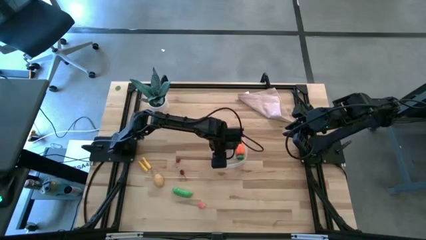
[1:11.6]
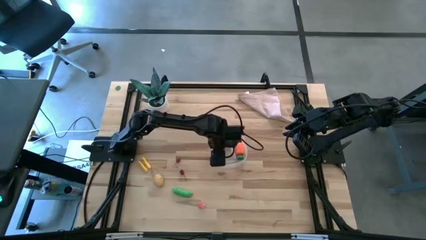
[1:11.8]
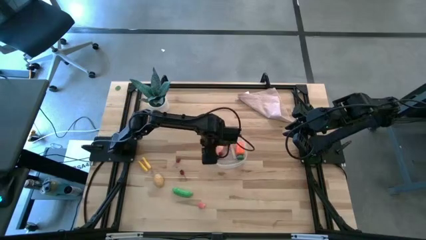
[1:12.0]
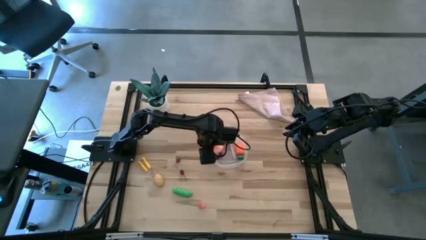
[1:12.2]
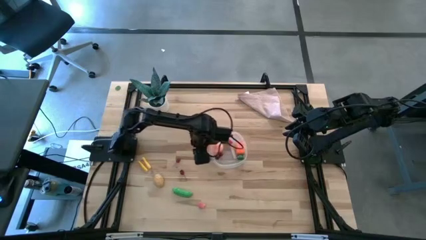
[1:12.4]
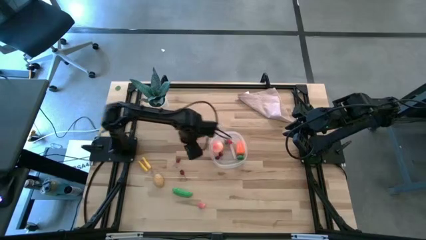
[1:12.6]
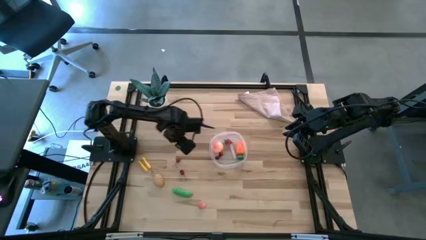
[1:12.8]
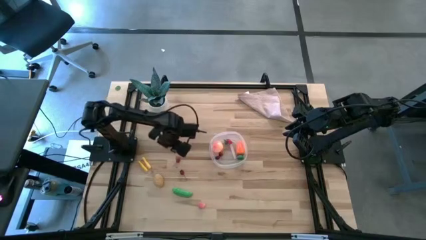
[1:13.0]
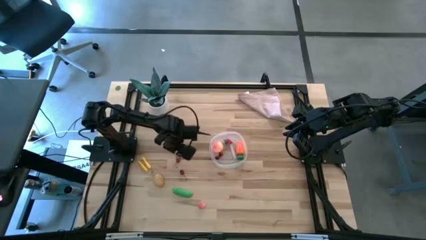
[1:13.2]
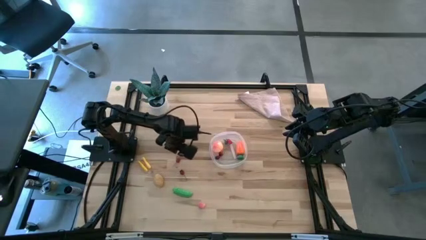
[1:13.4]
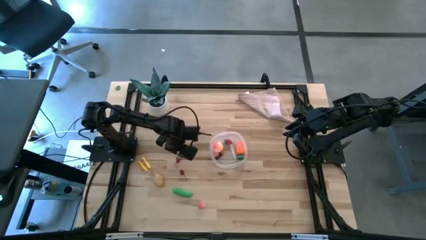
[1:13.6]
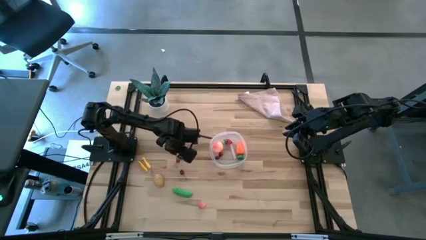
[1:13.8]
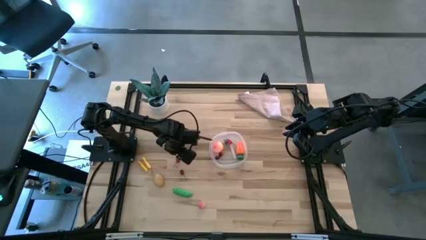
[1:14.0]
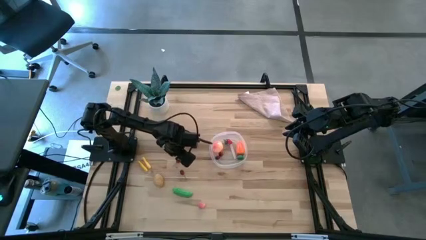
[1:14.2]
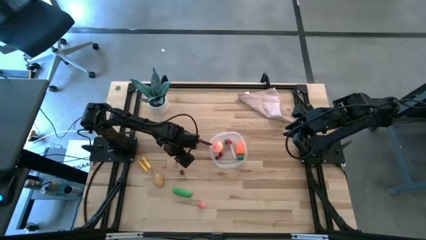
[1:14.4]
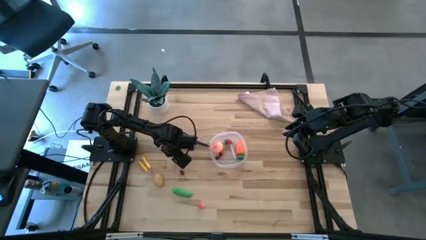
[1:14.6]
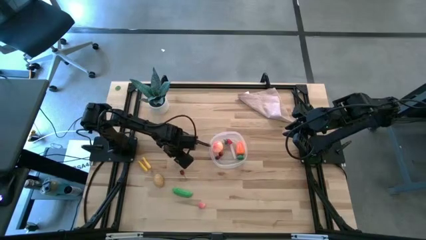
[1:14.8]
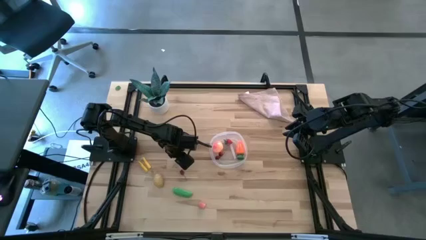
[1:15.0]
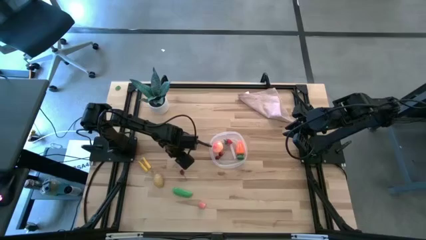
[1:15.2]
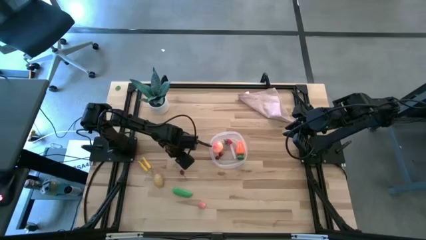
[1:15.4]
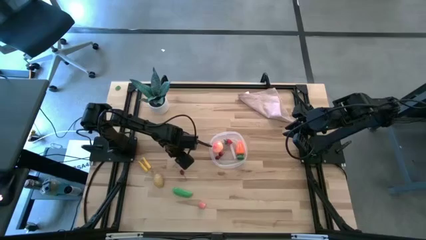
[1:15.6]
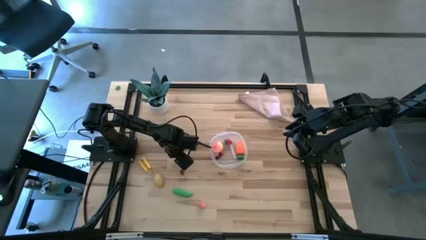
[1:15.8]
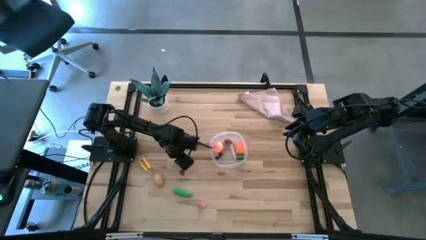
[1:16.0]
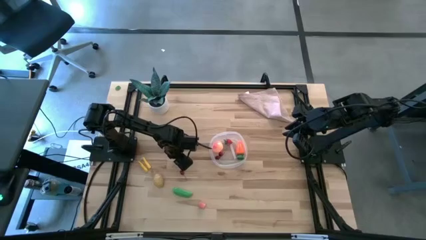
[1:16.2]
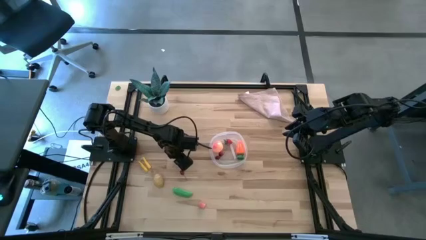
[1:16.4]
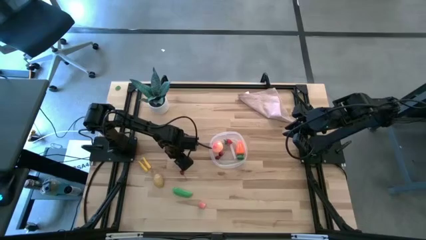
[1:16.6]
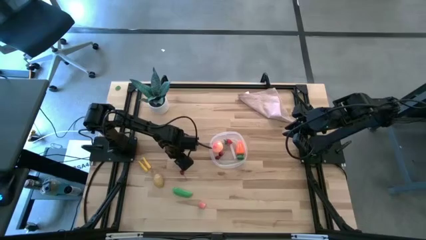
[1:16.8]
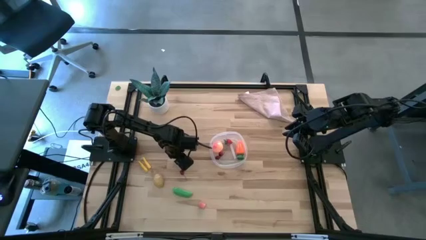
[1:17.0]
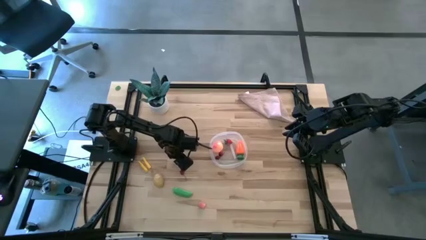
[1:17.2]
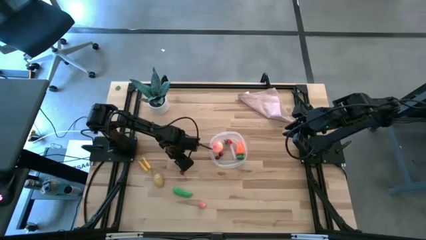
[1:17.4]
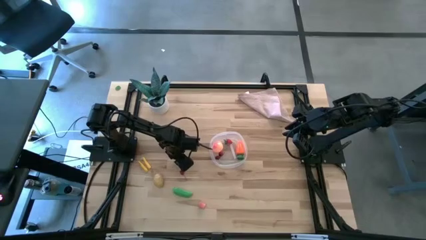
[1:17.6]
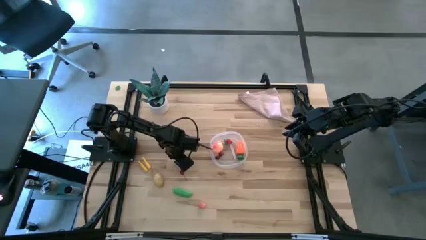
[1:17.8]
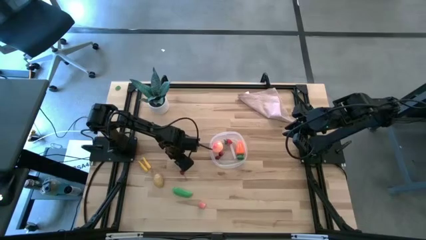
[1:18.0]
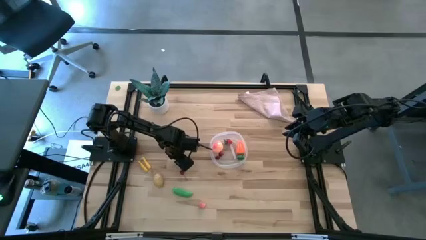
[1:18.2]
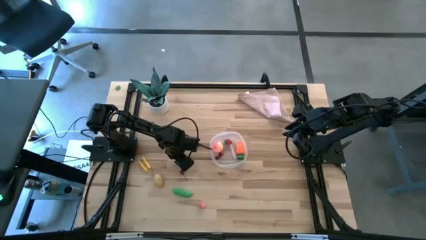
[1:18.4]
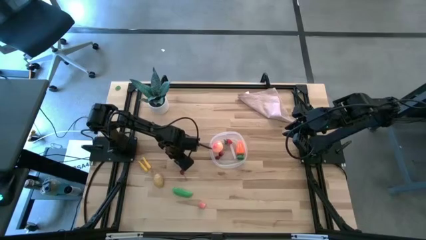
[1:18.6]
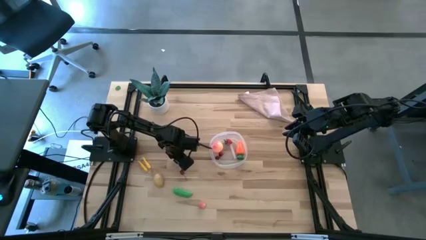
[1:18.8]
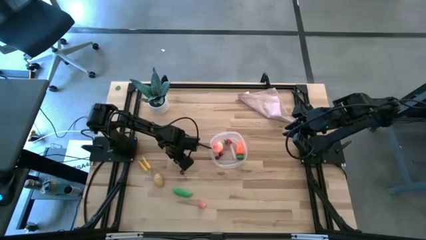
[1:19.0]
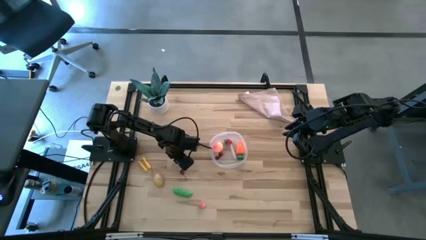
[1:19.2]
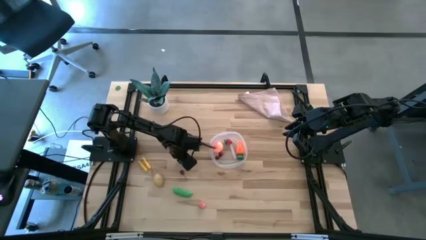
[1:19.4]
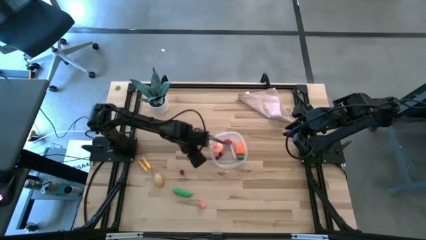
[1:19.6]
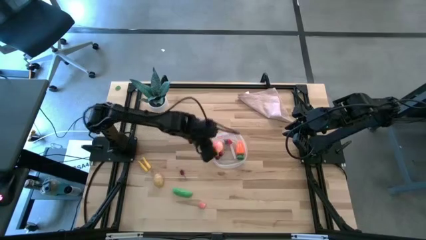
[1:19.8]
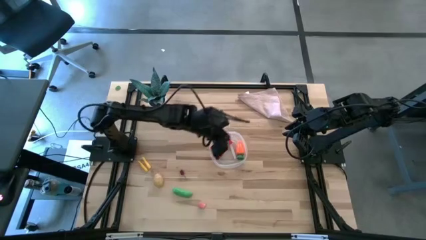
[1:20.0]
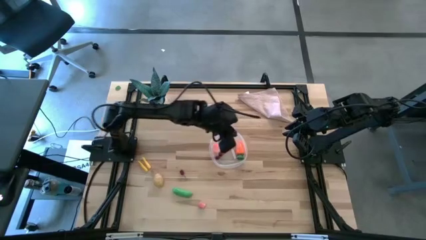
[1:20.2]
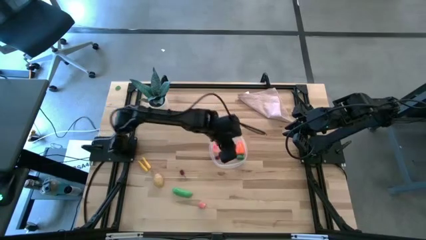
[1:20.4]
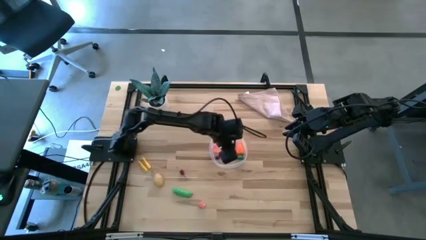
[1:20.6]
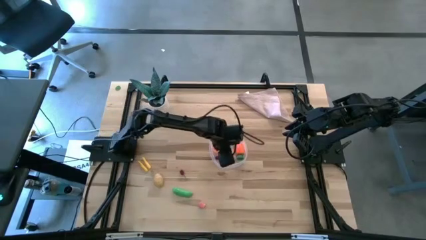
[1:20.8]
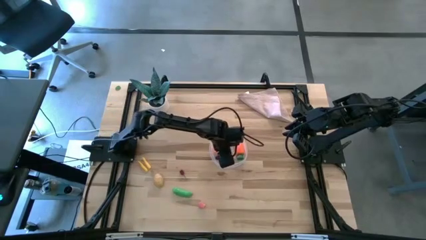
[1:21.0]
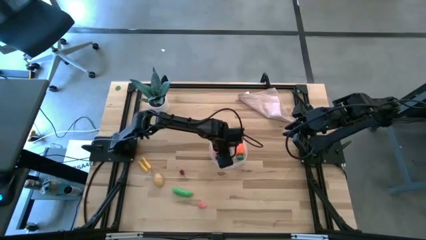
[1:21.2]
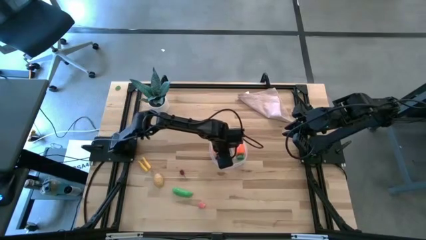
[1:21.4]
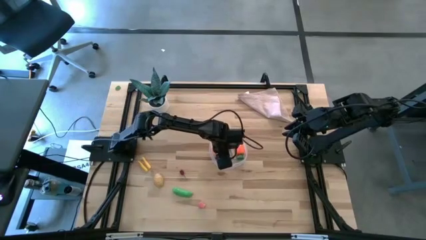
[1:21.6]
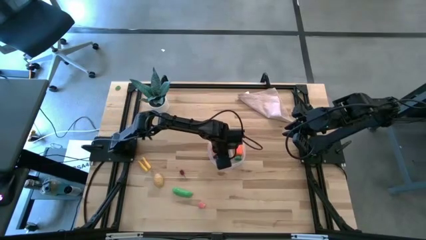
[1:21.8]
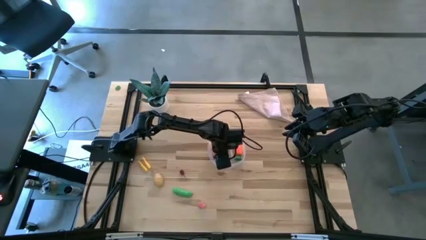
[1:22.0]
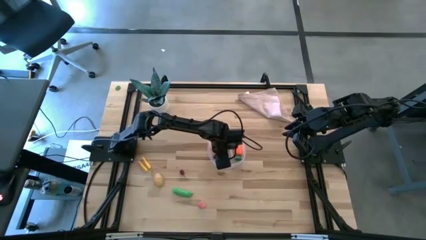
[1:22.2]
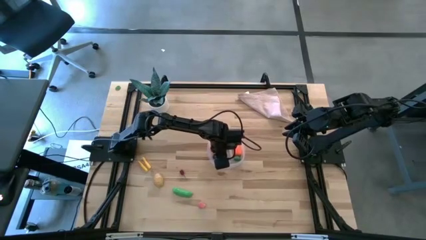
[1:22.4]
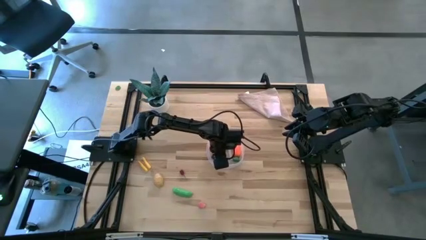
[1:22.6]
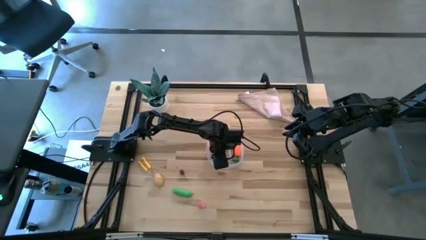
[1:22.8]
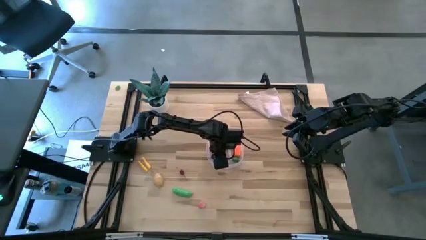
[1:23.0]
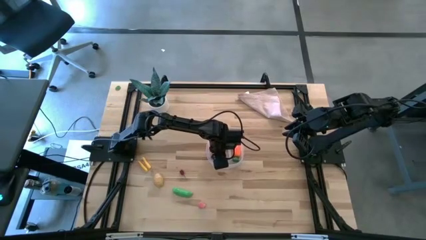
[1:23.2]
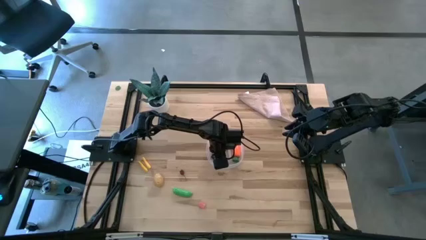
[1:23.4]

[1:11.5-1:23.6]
Task: Pick and placing Produce into tupperware
Put the red cherry into the transparent bin

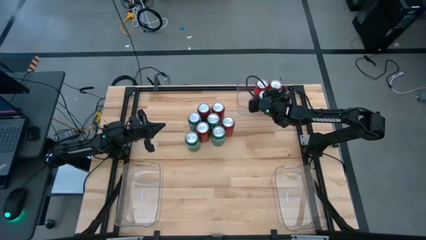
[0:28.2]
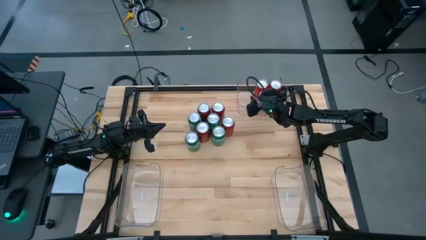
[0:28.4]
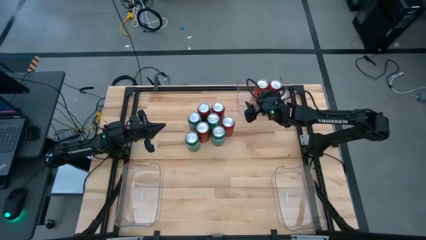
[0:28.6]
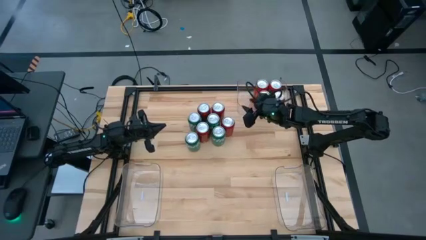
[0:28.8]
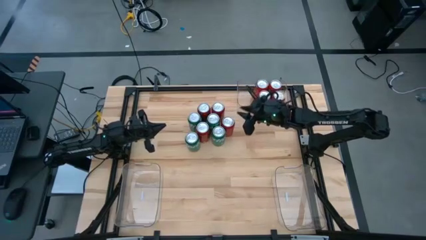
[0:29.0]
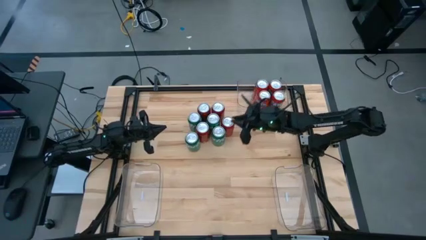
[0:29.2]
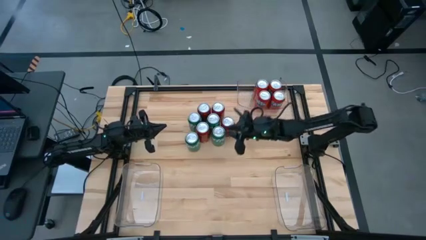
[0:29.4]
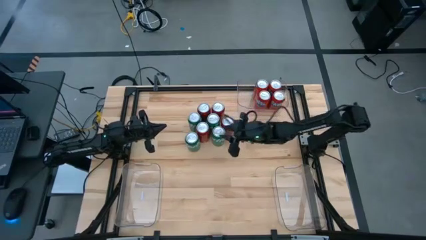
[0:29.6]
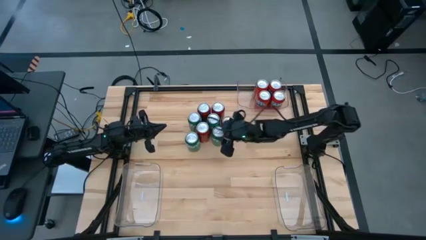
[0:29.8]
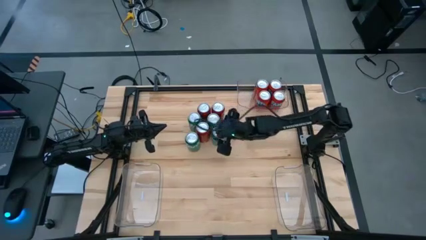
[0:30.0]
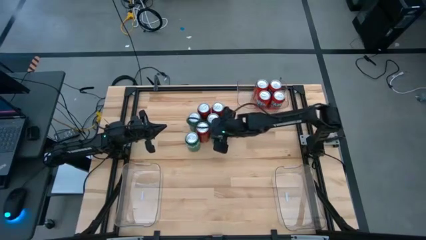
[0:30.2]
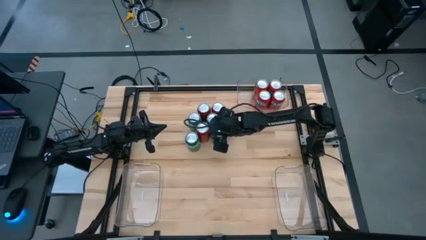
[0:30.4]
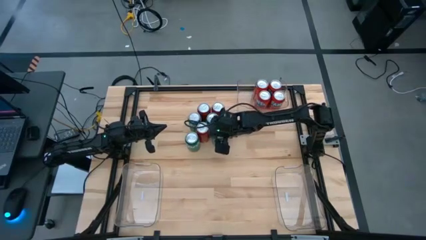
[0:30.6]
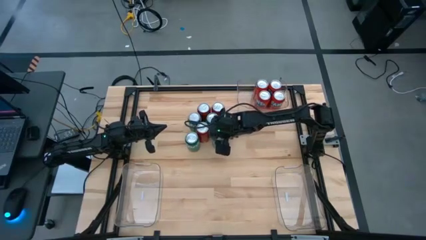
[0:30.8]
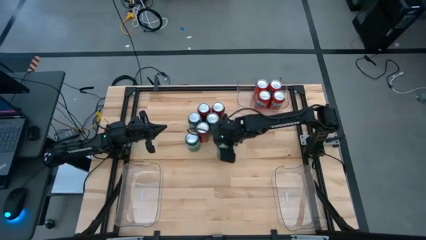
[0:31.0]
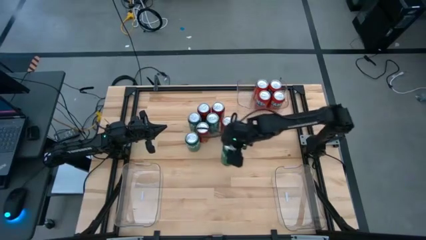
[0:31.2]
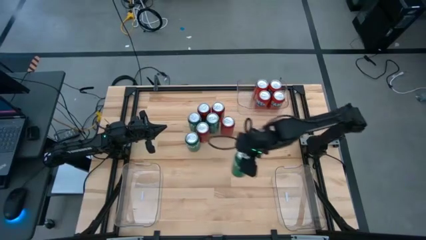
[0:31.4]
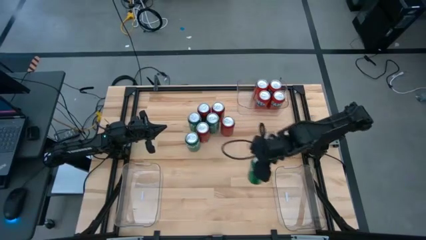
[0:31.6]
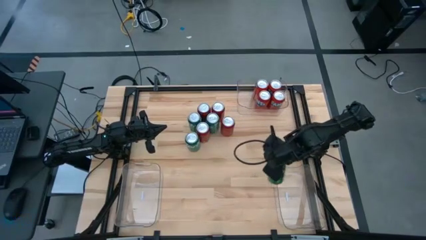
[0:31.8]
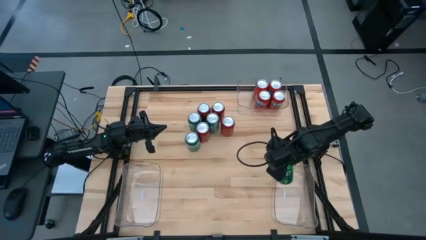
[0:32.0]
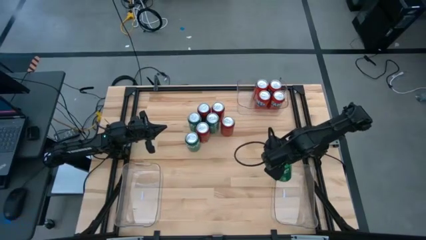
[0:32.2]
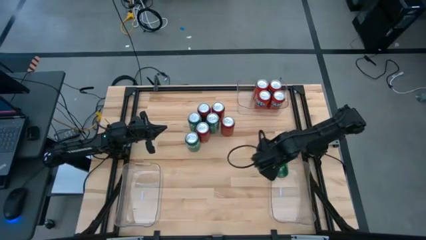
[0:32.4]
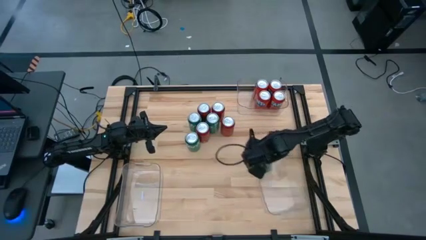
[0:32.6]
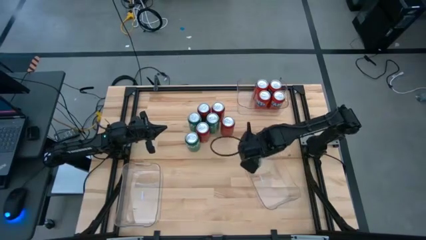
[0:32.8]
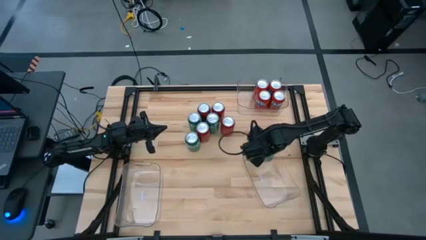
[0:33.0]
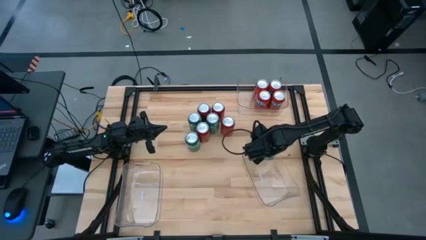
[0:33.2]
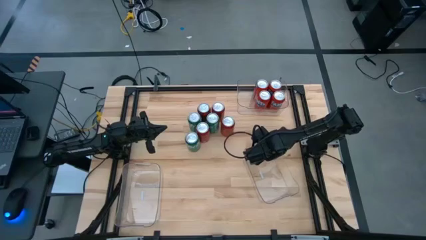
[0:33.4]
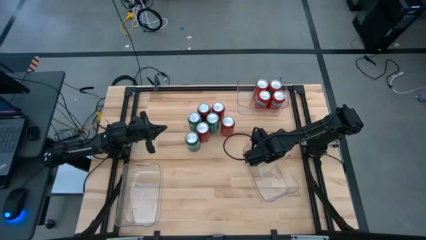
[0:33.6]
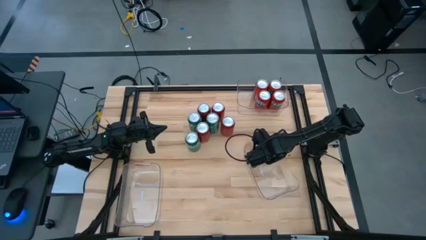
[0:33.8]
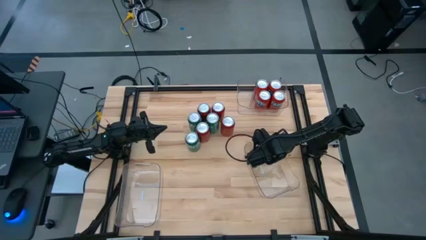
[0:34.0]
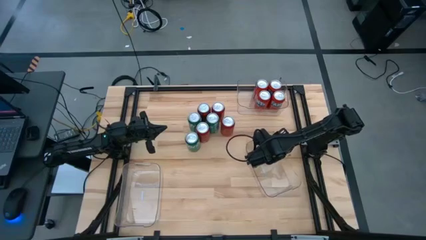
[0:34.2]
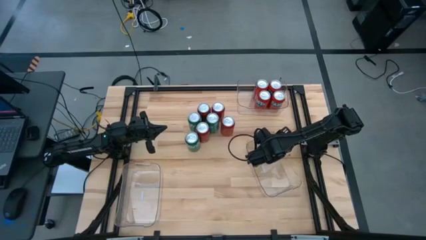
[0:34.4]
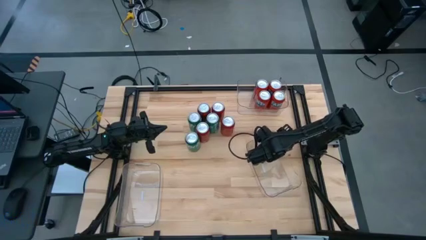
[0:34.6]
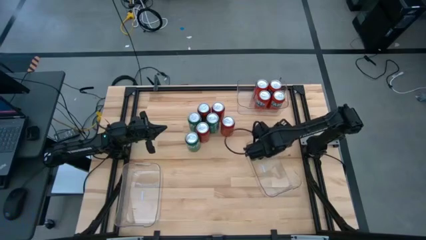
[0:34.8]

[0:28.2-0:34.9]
Task: Sort soda cans
Put the bottom right green soda can into the bottom right transparent bin
